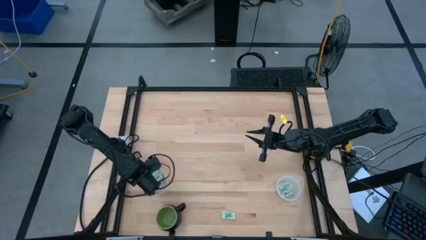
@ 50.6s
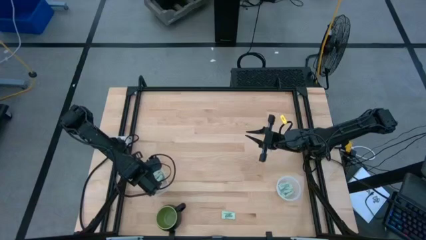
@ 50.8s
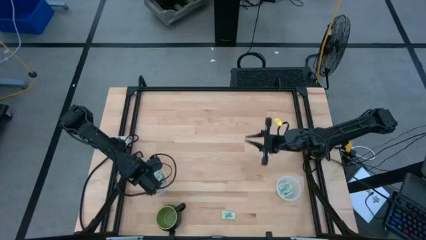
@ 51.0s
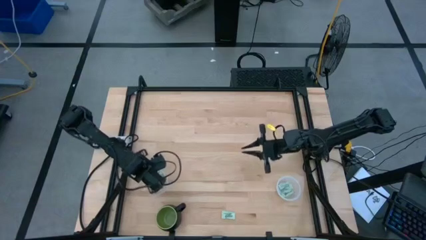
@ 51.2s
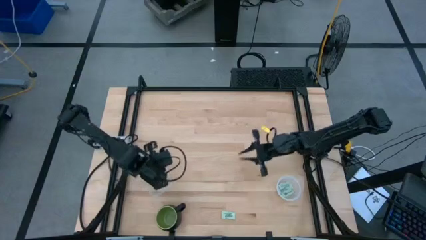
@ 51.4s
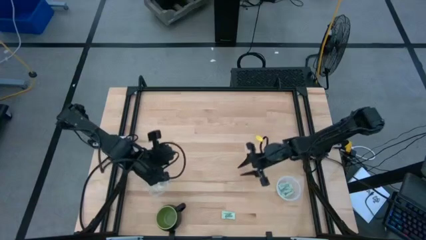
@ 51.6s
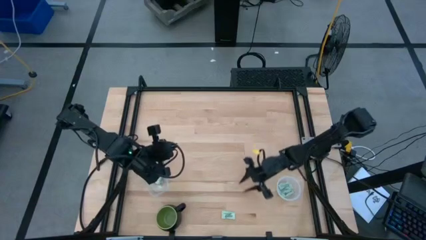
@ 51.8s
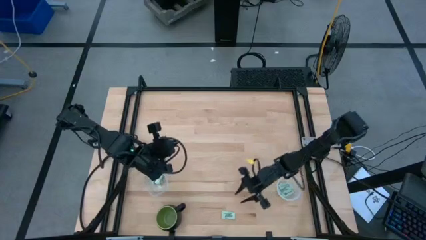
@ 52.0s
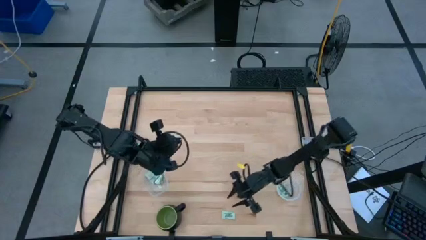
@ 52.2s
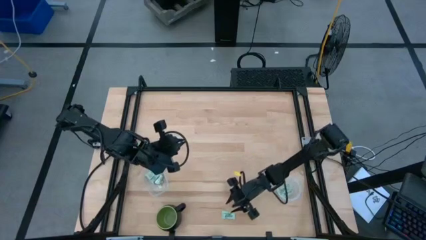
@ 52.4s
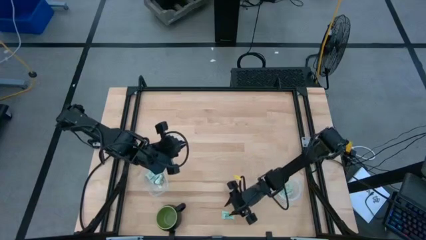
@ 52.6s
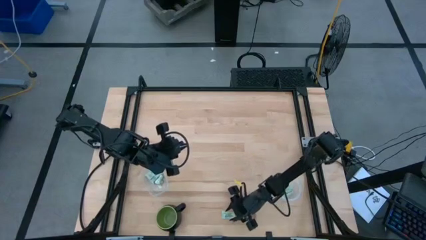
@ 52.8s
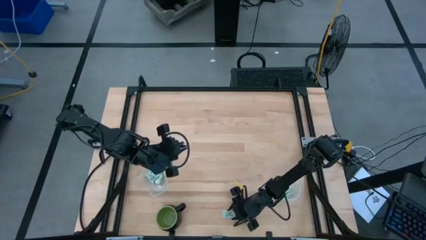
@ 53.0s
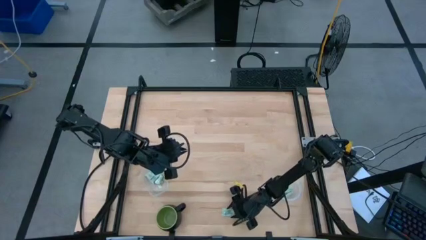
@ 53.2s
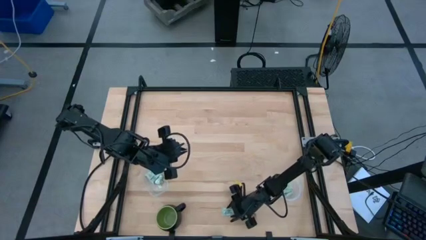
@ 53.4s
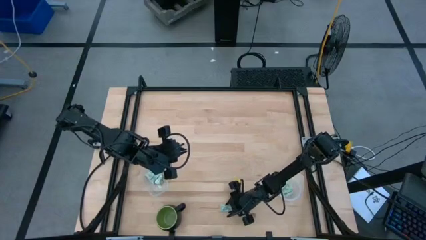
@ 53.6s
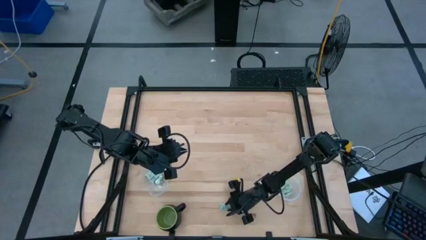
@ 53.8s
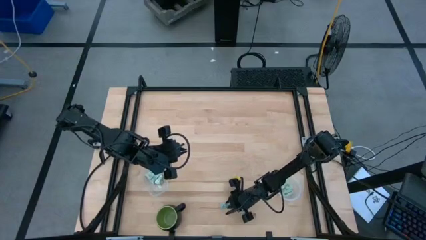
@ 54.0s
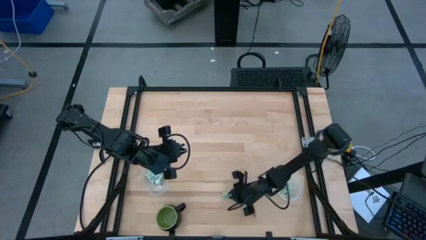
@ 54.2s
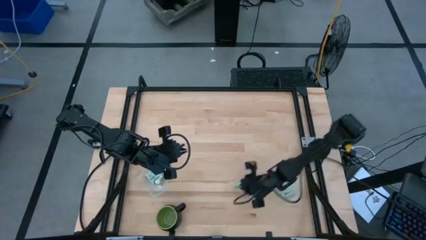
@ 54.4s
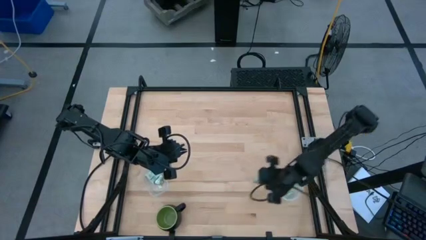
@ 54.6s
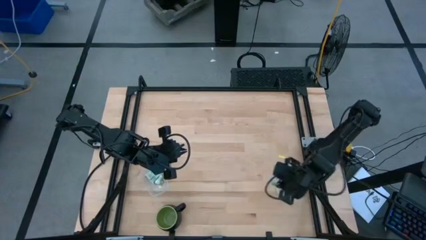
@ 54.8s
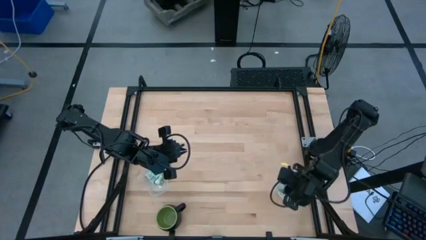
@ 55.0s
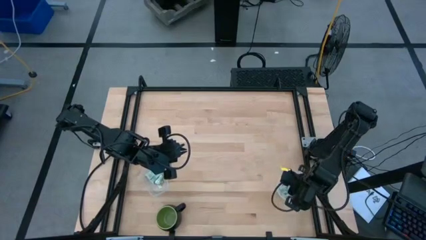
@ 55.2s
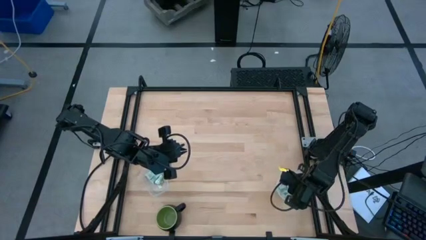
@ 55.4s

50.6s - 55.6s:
Task: Pick and place items into bin
Put the green stevia packet into the right transparent bin

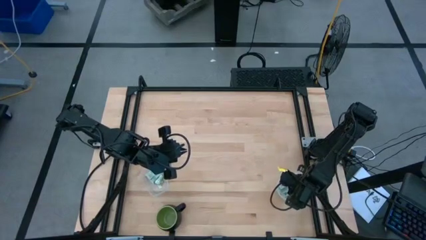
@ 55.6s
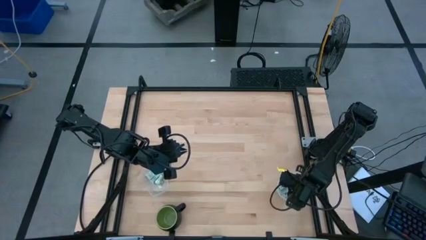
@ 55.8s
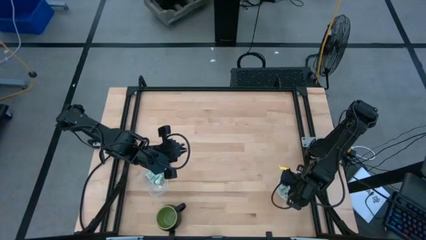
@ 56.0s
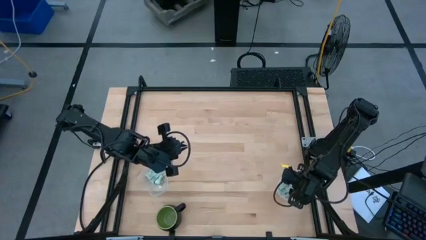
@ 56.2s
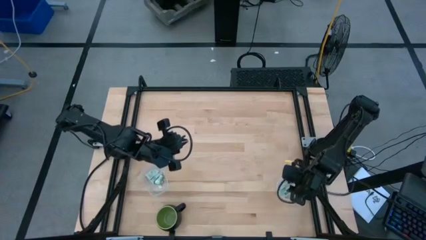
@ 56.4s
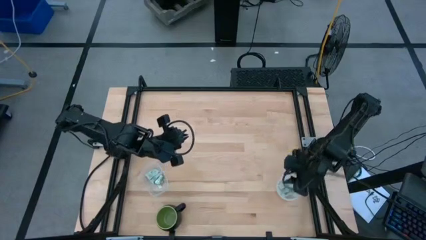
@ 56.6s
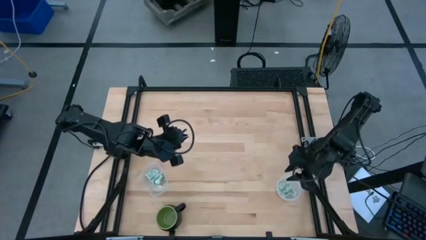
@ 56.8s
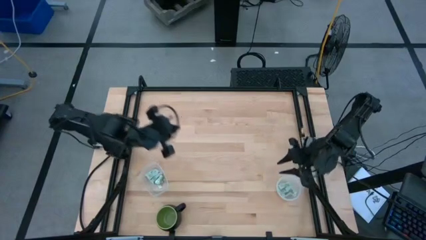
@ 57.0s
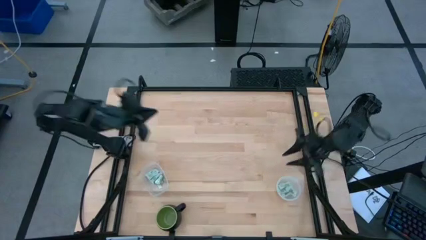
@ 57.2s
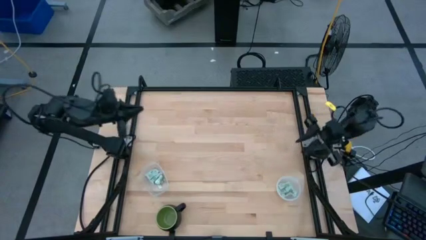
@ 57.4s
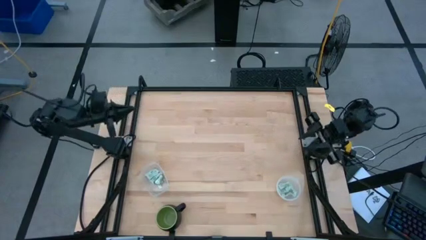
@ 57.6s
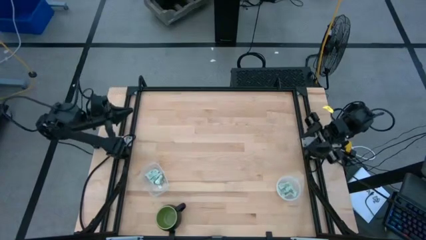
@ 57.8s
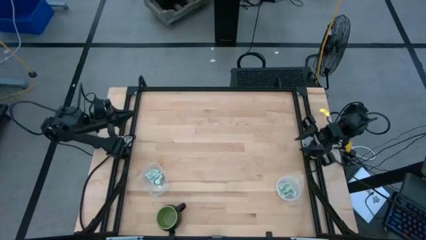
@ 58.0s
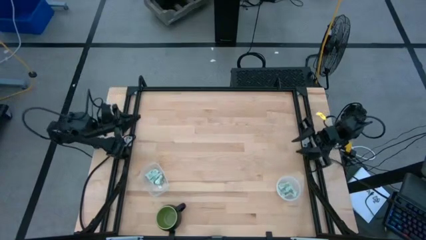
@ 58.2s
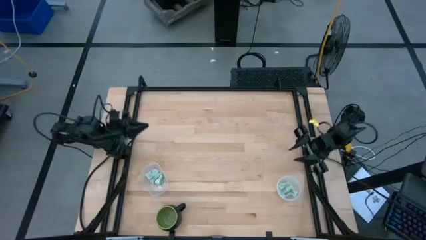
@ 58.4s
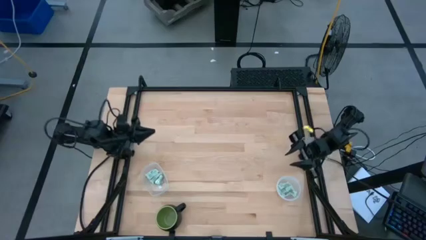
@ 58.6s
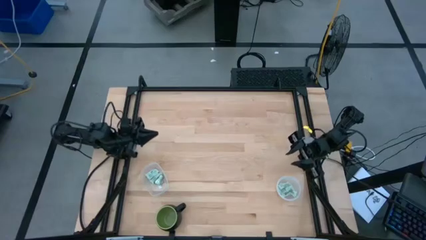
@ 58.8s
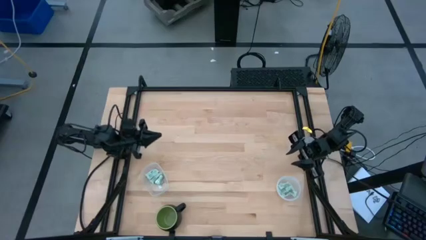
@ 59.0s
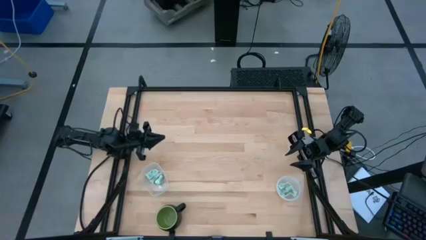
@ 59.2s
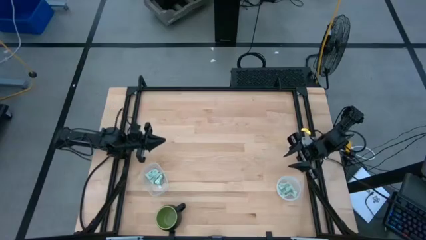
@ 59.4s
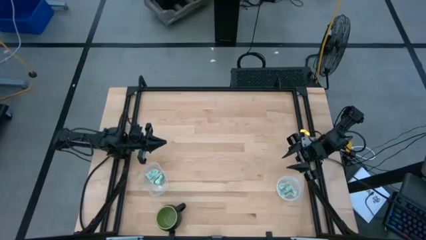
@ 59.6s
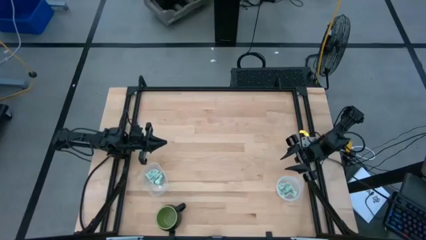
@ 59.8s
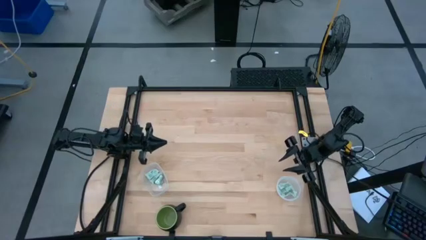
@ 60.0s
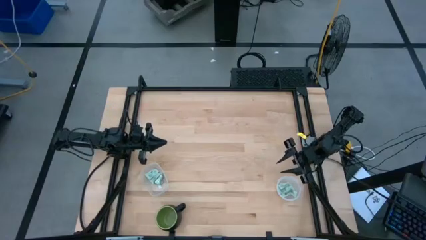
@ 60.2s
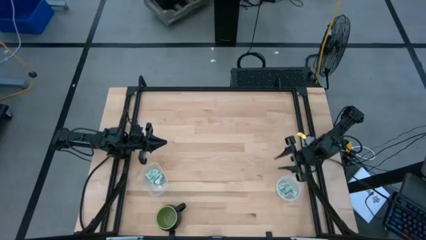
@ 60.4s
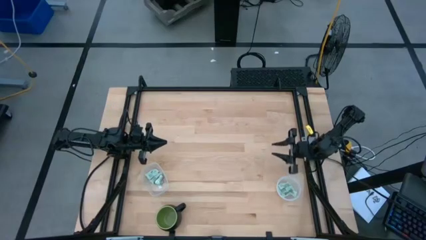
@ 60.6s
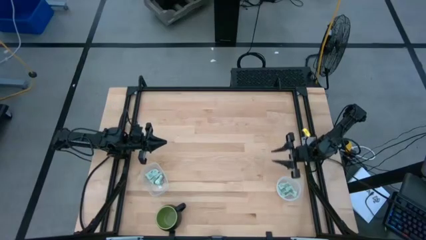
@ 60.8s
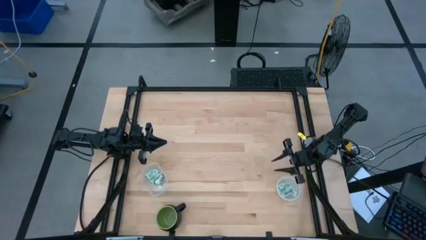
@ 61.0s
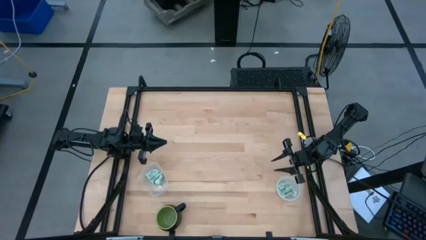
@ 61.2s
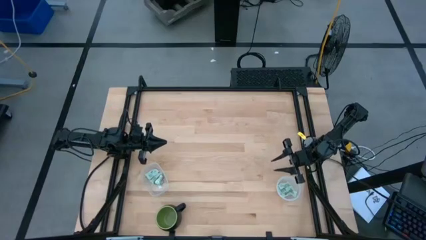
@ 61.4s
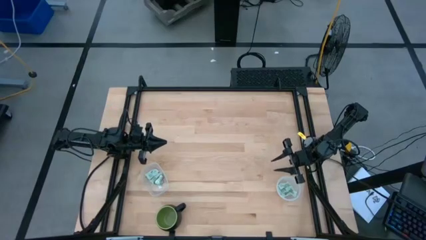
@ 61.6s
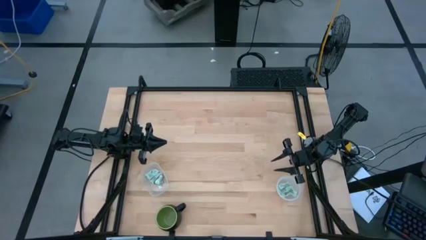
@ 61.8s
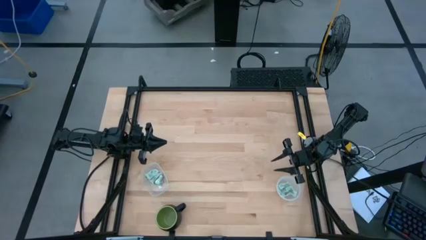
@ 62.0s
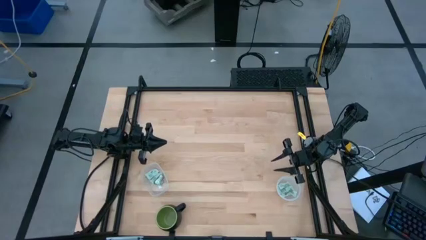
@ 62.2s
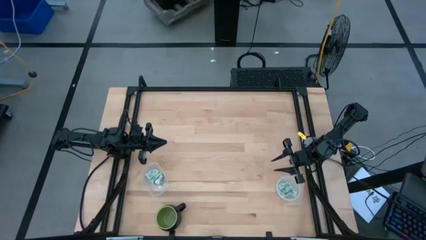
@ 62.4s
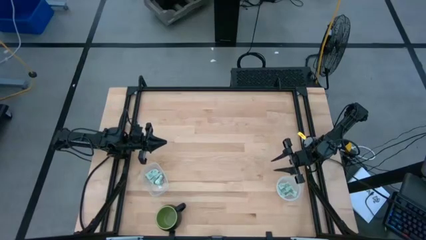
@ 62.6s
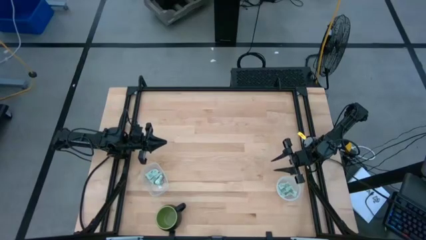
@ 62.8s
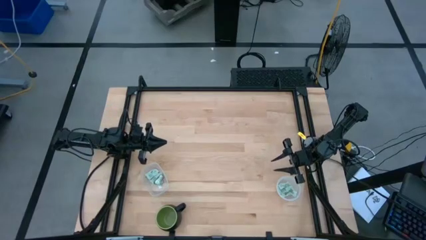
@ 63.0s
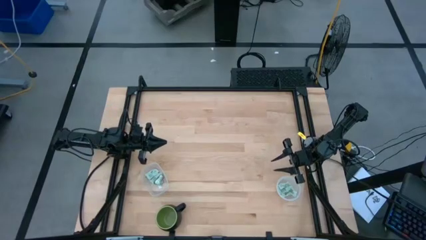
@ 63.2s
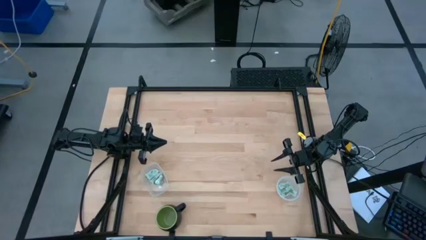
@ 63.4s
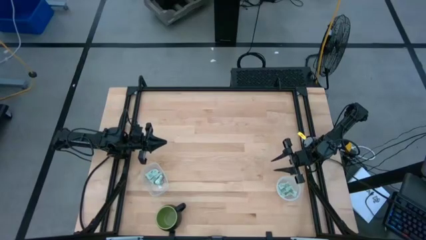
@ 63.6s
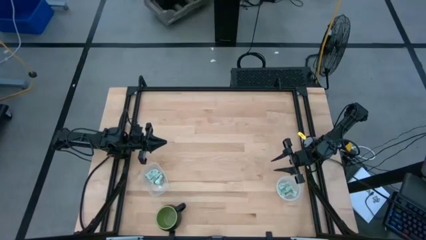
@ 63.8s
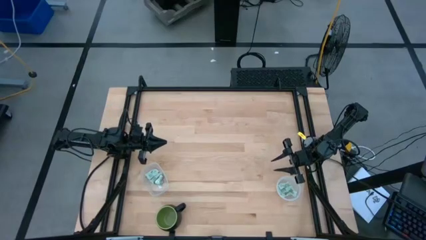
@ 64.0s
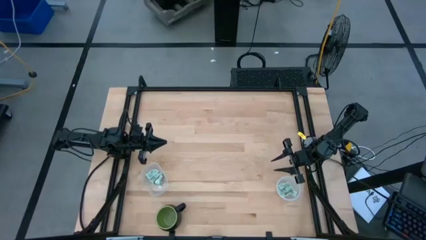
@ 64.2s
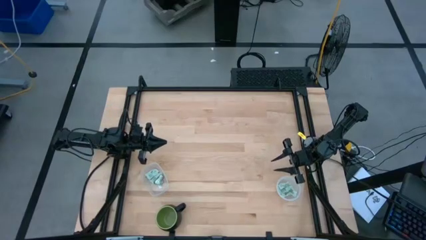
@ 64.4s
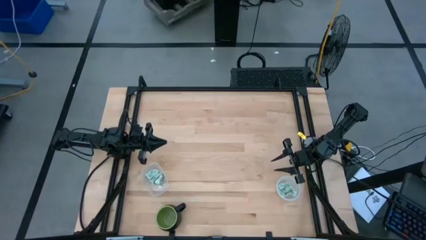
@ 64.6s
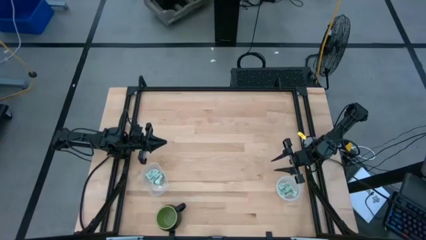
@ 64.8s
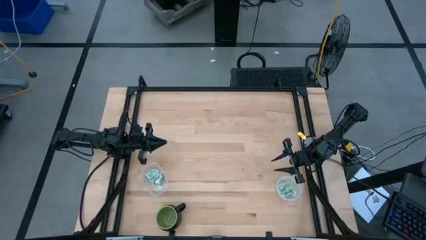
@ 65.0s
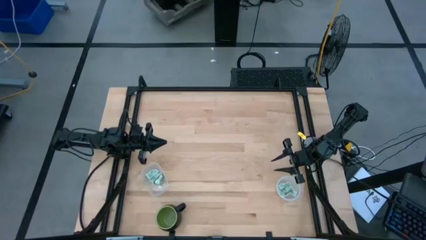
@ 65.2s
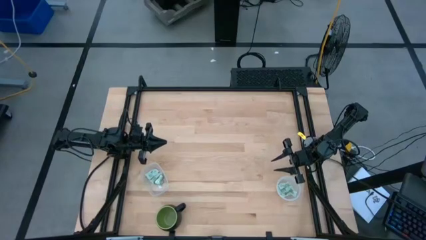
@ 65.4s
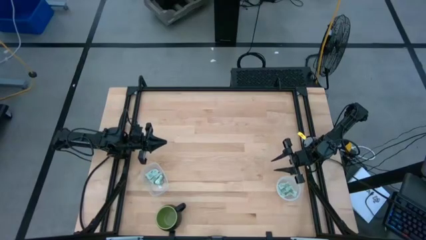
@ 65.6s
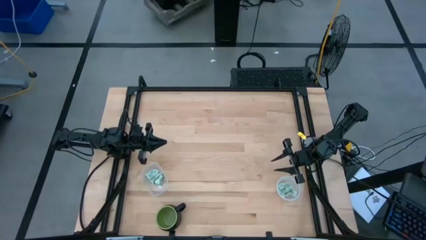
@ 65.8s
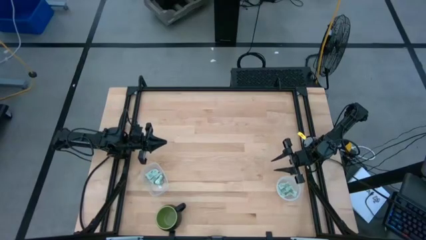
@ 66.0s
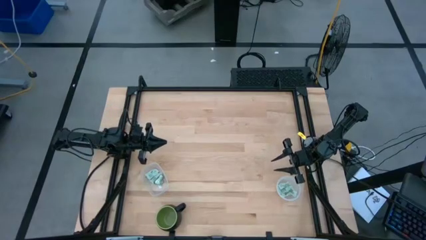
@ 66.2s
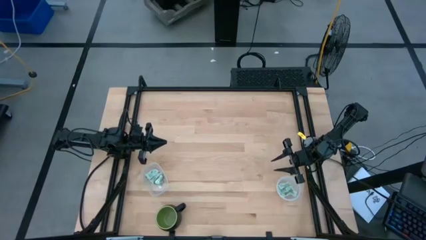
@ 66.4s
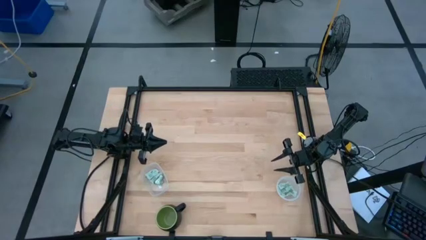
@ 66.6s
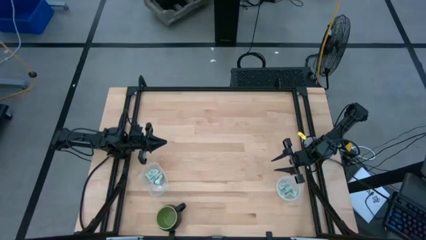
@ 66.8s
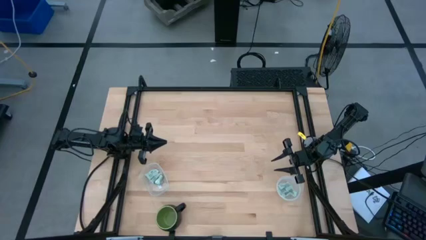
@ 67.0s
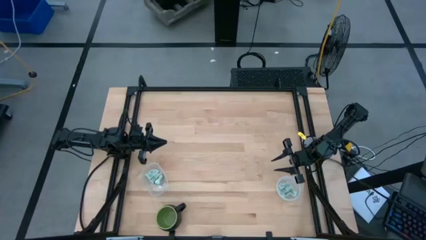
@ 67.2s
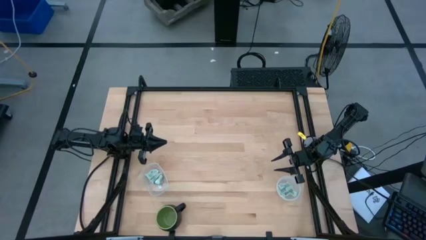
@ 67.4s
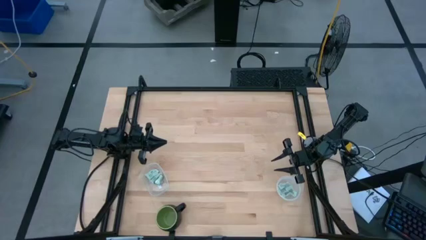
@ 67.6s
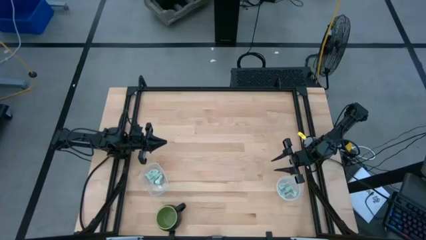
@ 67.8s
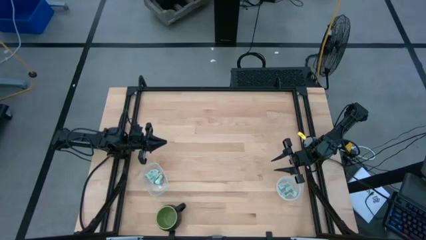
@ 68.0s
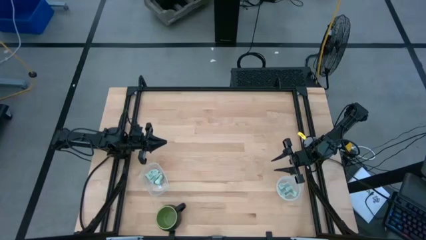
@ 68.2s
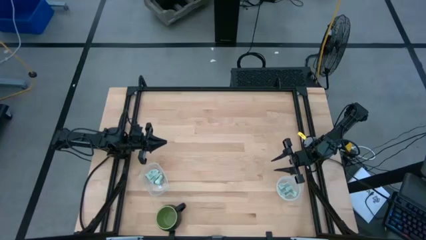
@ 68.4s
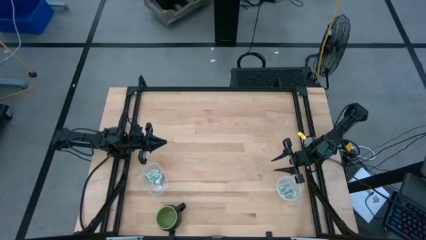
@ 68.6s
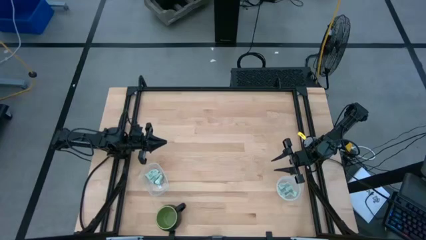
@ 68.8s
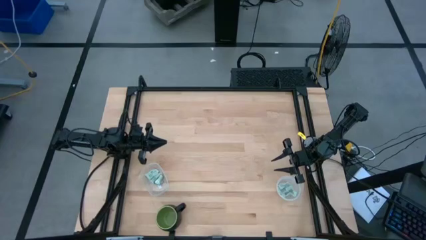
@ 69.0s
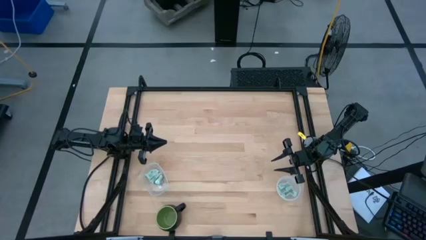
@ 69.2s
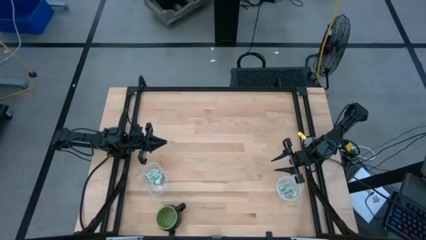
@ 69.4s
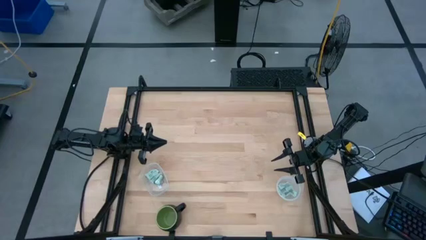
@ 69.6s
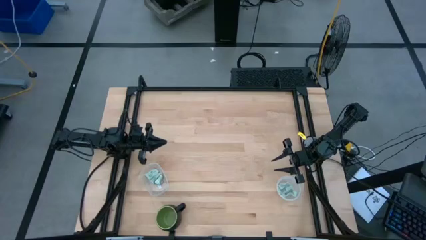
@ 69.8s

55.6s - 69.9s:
Return to Home Position
